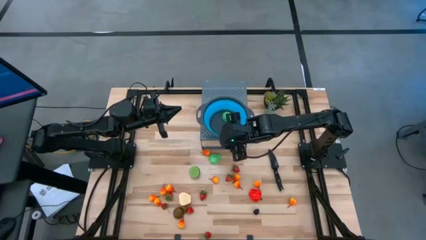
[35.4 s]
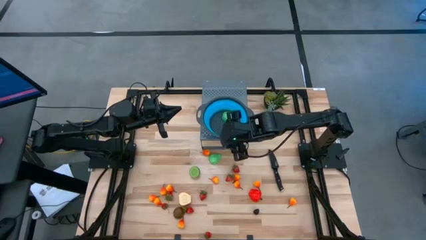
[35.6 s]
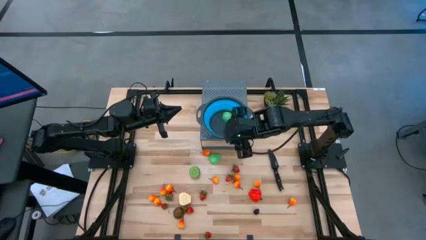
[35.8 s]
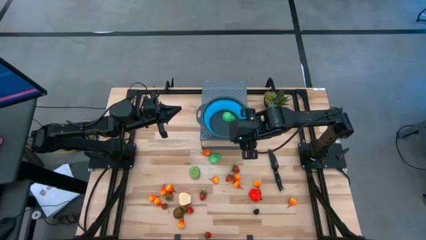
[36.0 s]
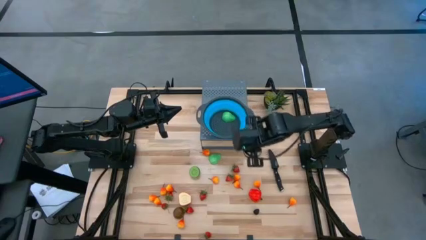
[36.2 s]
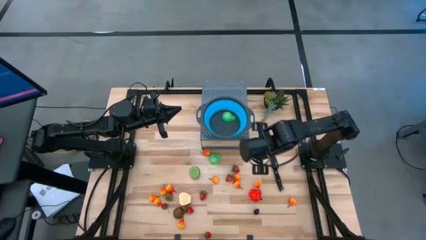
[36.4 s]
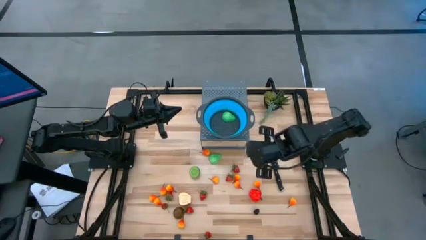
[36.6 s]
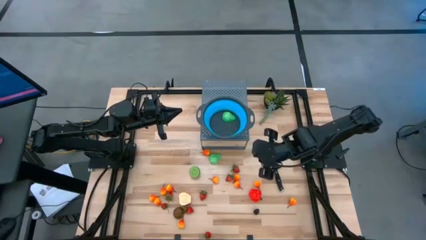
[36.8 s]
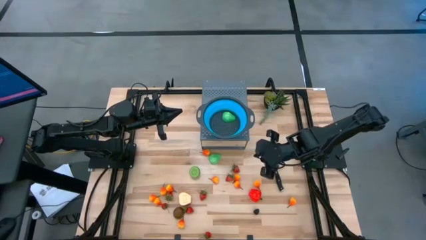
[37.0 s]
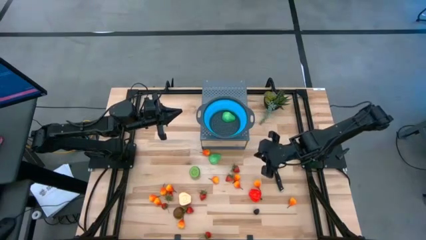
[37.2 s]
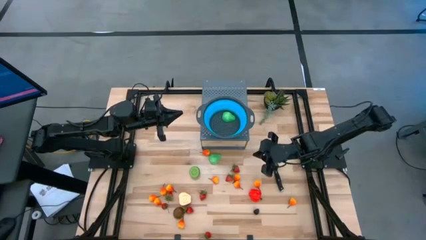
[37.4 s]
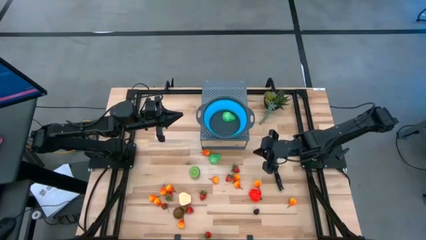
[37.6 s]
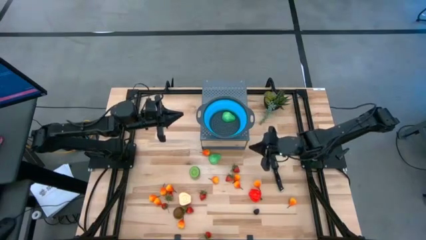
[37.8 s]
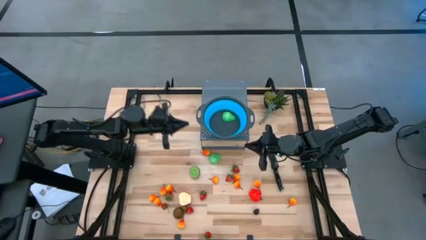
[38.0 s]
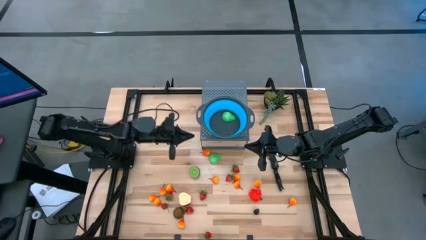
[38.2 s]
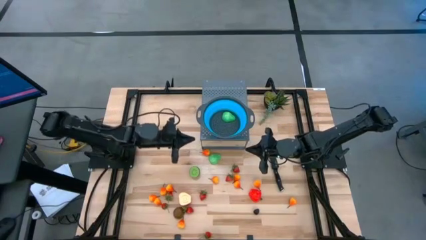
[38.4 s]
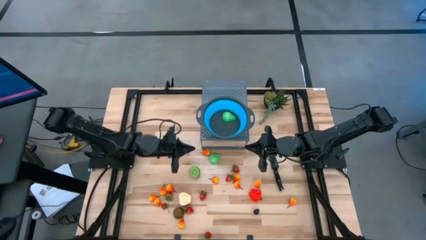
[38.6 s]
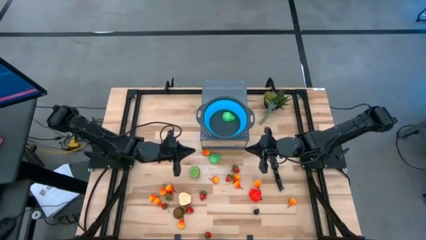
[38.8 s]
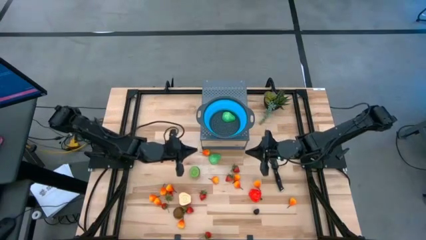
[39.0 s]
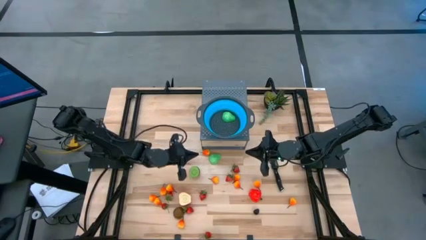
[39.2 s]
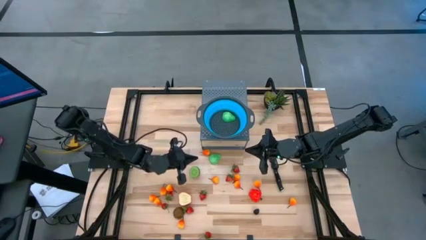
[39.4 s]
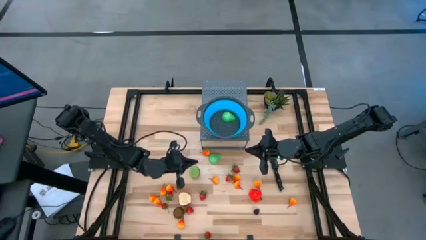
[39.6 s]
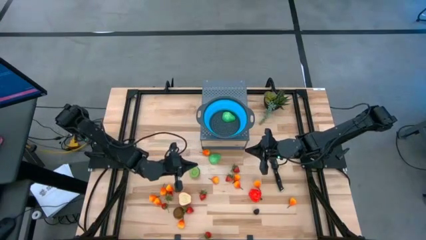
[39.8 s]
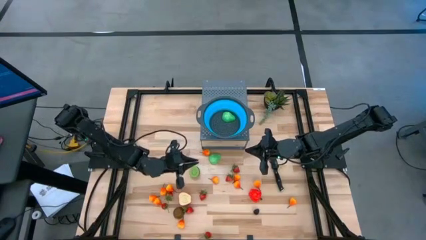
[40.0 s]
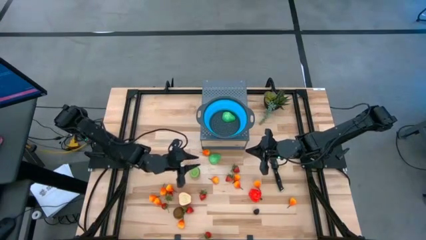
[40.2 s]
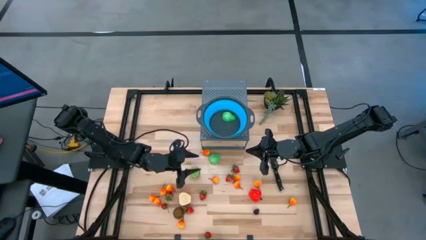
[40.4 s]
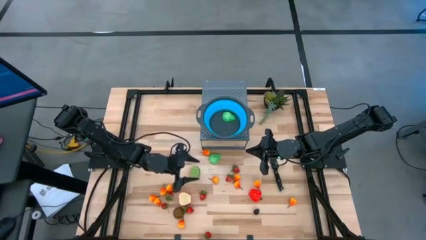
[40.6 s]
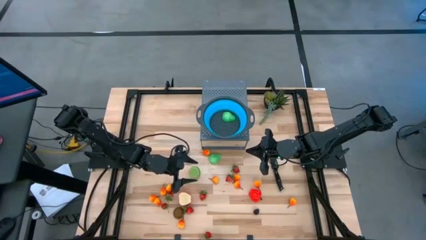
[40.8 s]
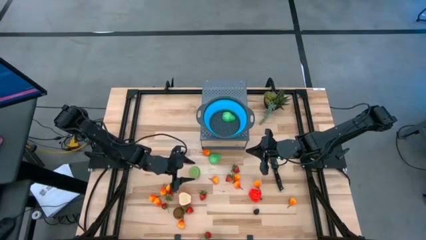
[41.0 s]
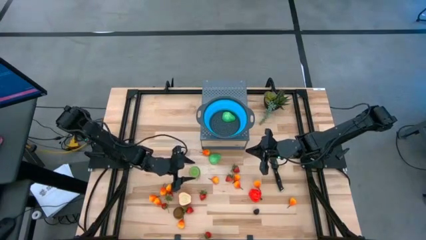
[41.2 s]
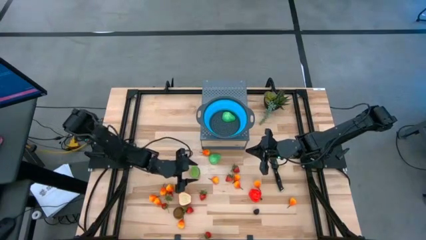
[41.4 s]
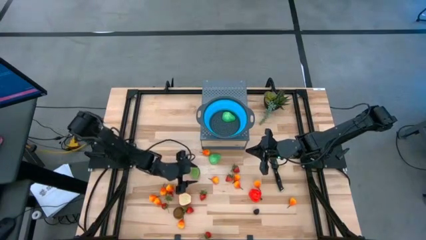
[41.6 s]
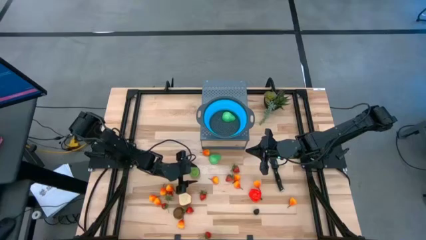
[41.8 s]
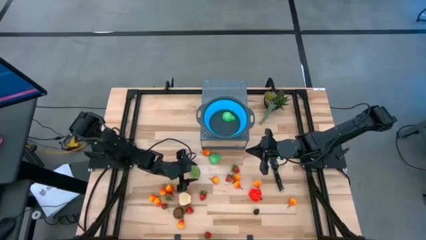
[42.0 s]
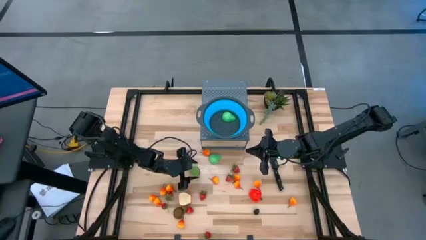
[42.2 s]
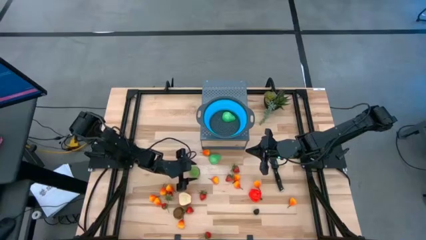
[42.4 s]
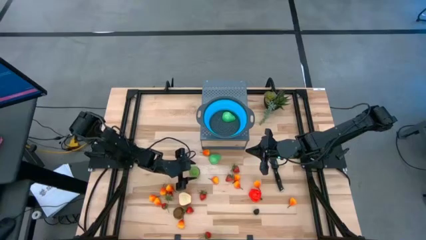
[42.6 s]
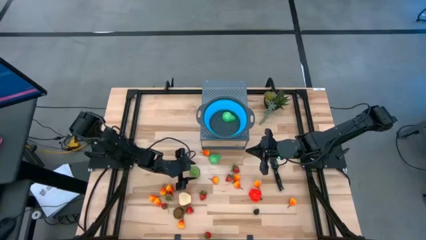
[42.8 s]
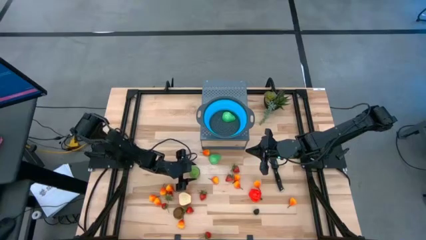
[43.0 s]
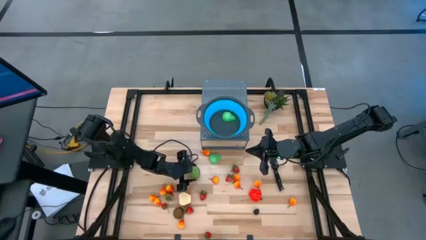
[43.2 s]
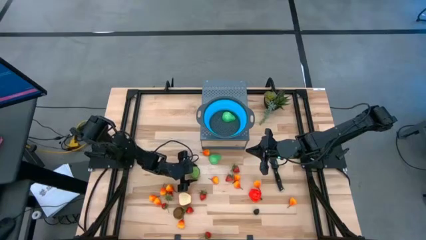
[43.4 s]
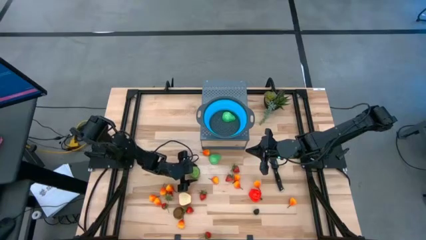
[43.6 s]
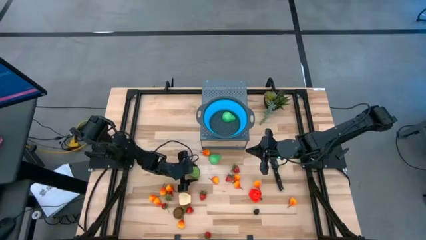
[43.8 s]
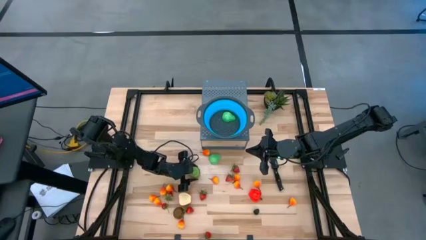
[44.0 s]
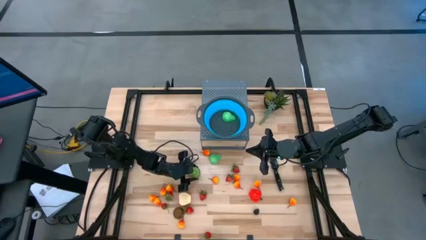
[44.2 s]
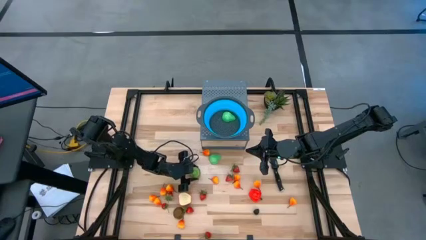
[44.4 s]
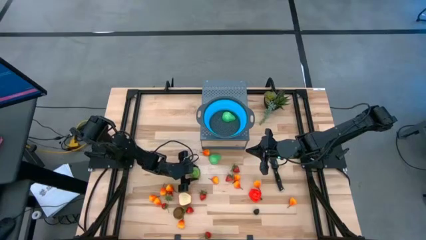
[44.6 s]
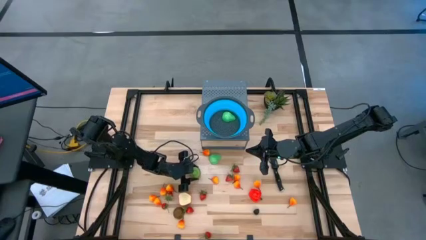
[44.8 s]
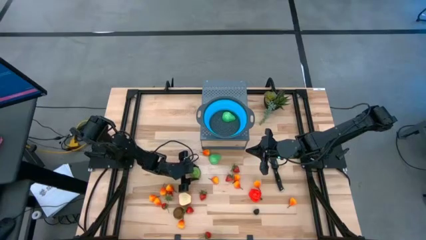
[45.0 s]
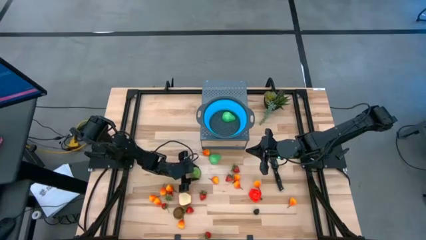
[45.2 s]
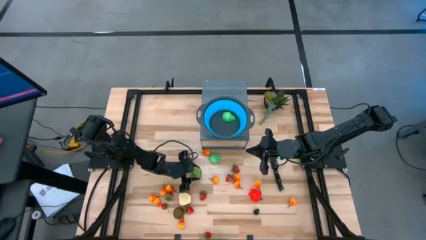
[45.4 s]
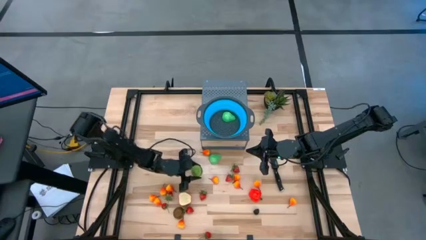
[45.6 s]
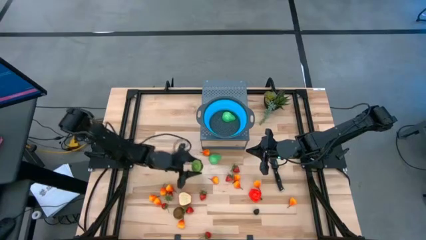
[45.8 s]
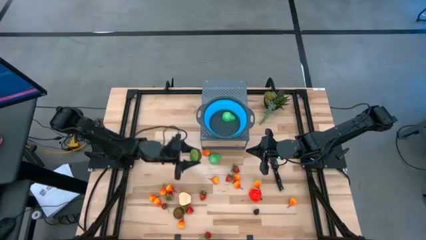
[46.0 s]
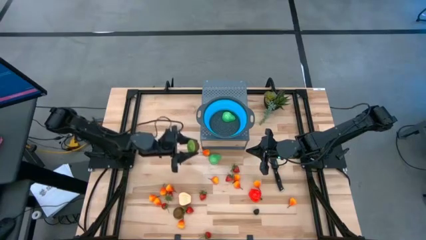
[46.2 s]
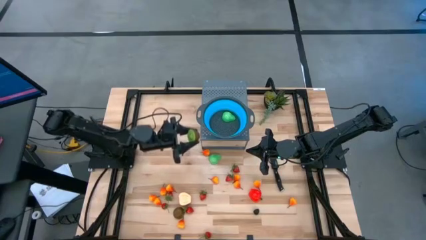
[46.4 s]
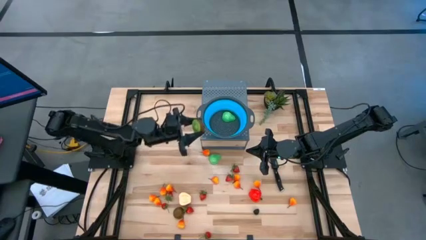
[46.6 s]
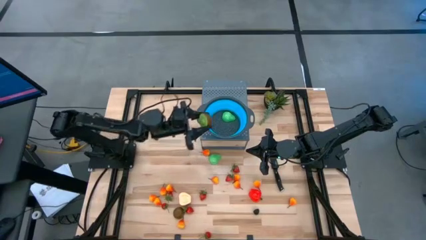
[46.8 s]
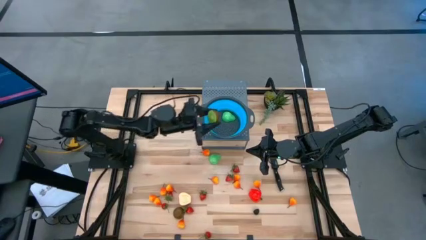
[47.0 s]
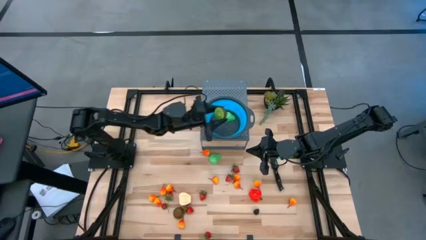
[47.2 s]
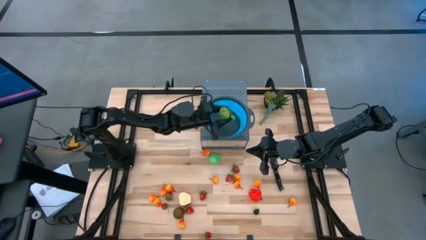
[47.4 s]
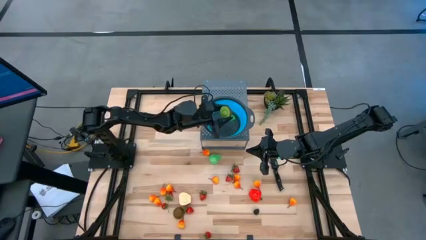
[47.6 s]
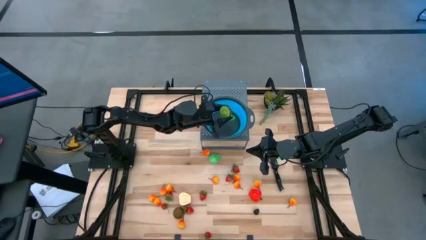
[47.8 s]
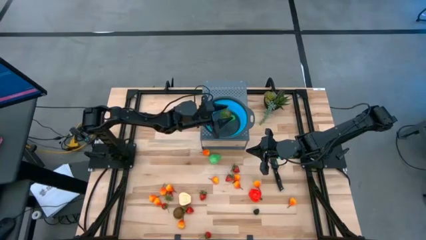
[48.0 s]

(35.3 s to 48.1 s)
Task: Pick & Place Fruit
Put the top sliced kiwi into the strainer bowl
